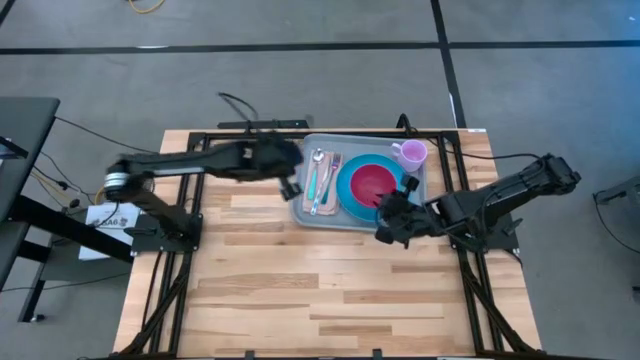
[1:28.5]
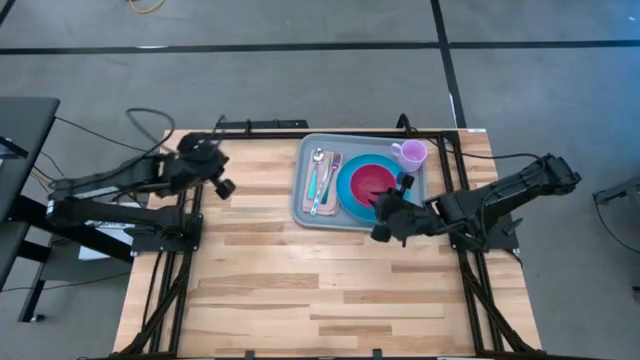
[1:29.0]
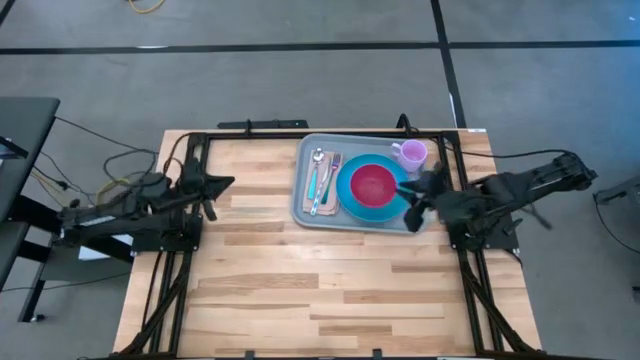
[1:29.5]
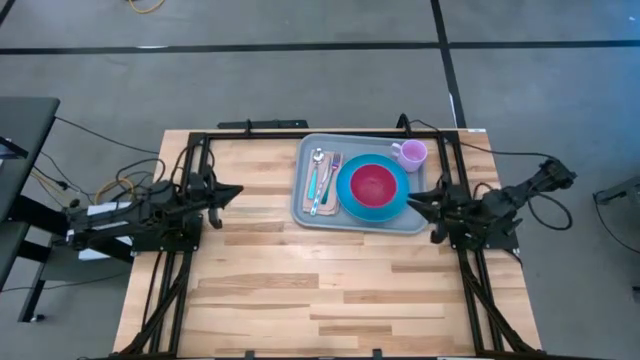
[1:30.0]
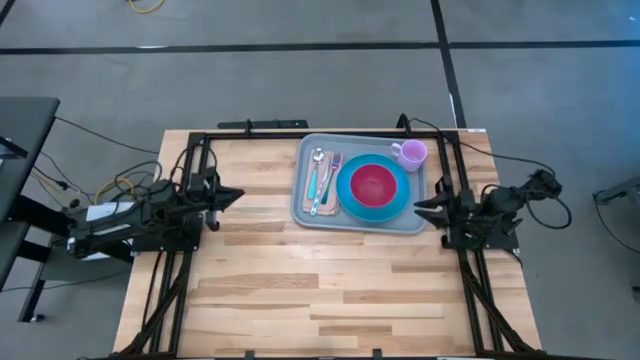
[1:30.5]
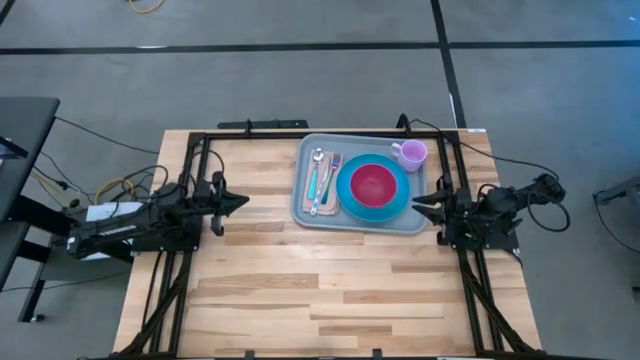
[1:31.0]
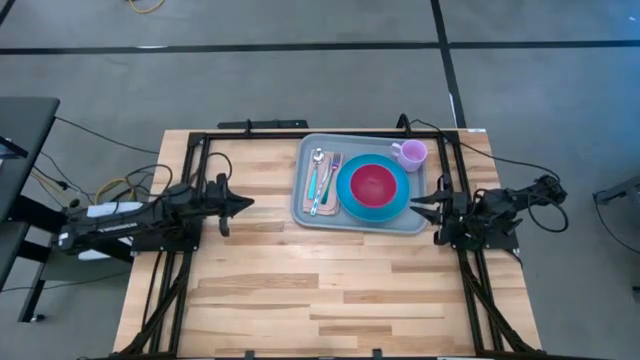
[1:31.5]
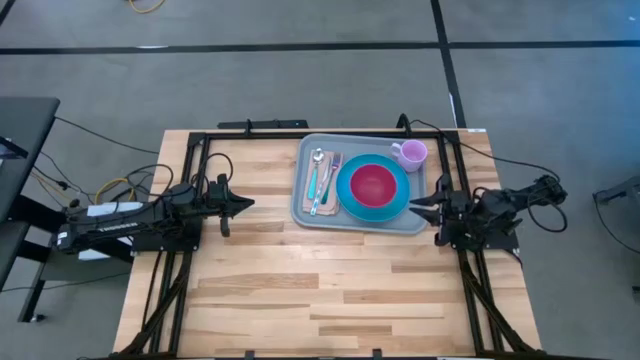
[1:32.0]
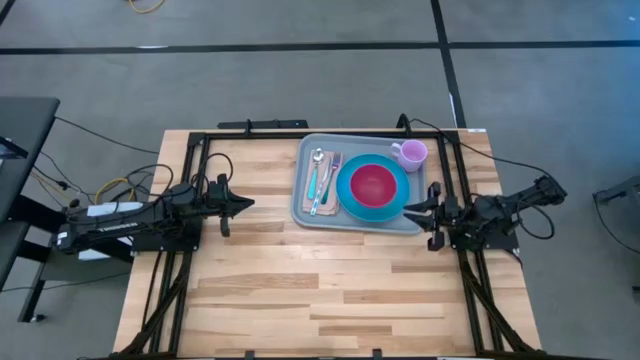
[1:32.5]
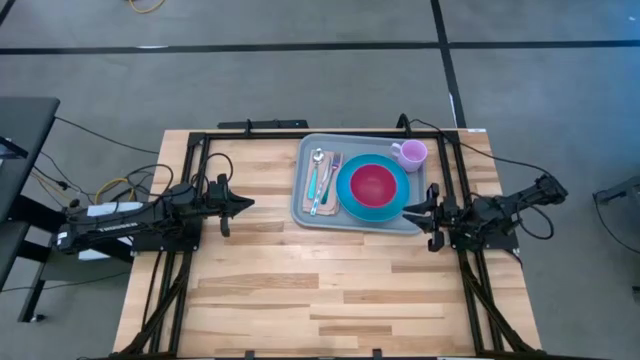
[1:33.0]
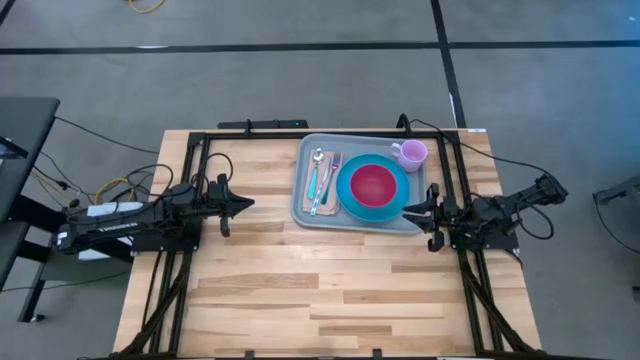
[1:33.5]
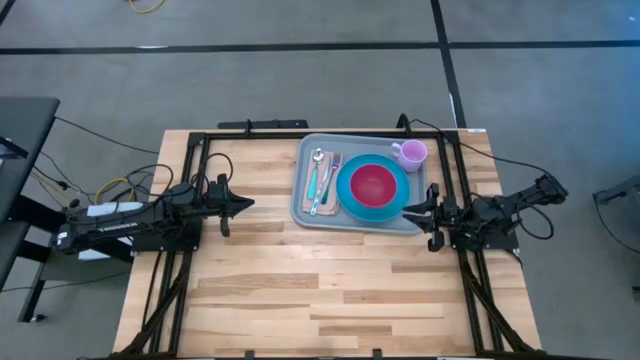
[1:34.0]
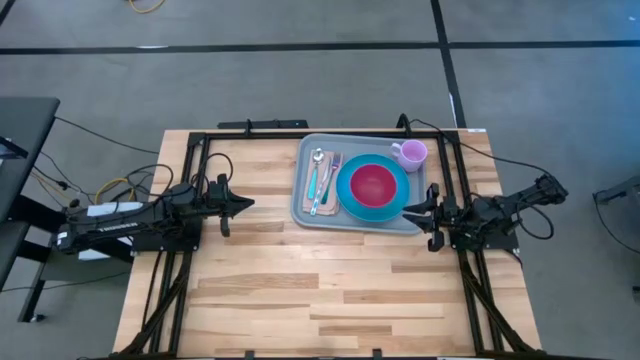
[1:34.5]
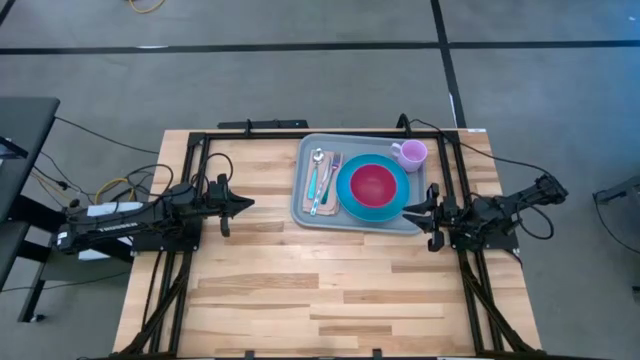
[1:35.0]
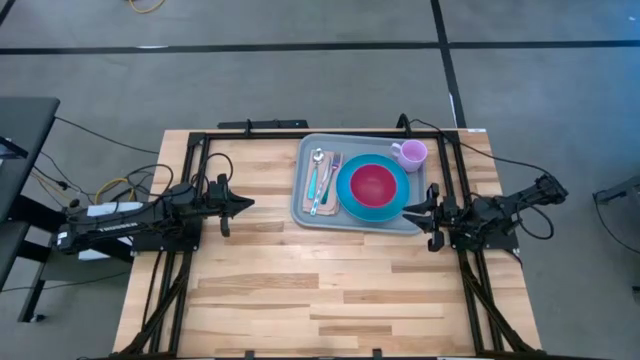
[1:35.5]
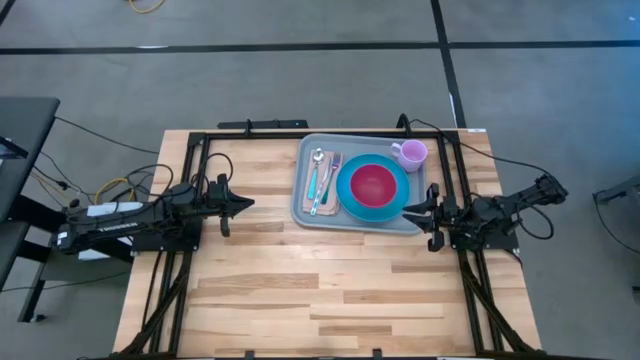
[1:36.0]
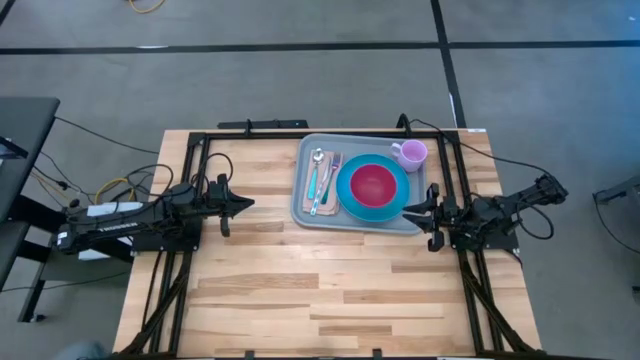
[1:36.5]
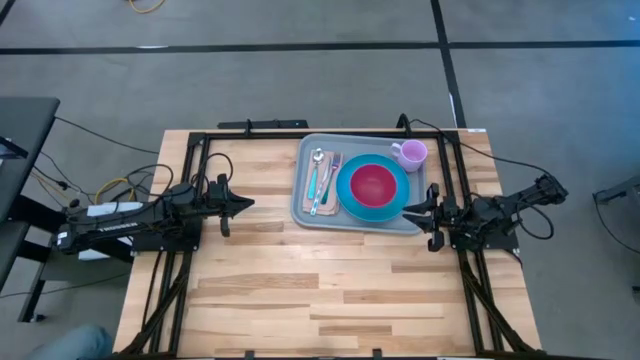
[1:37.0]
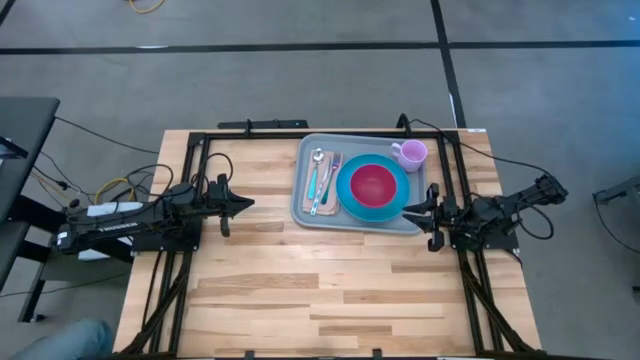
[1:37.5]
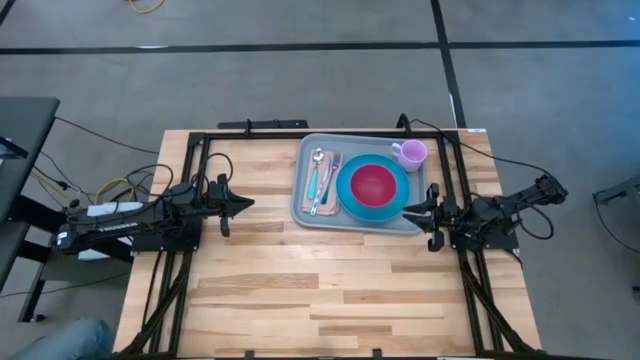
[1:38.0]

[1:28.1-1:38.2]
Task: Set up tray
Return to Home Position

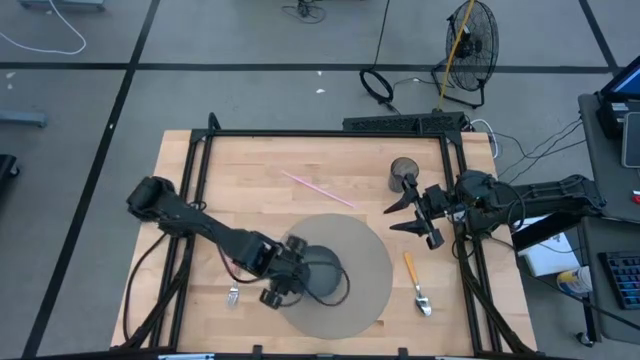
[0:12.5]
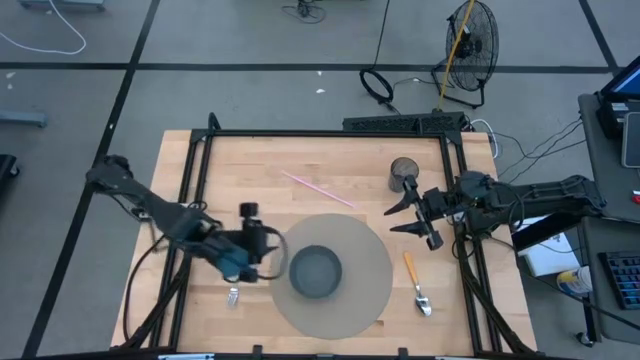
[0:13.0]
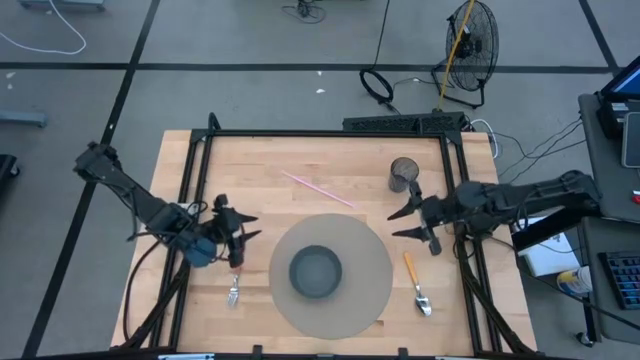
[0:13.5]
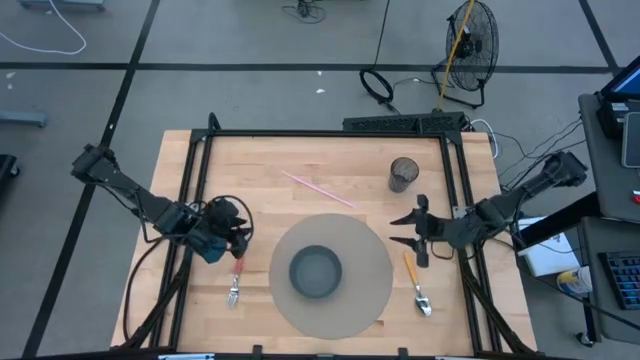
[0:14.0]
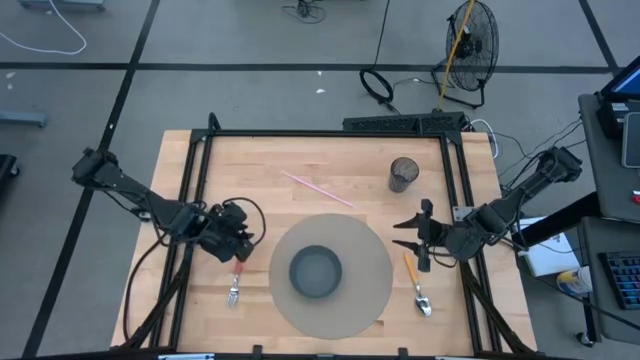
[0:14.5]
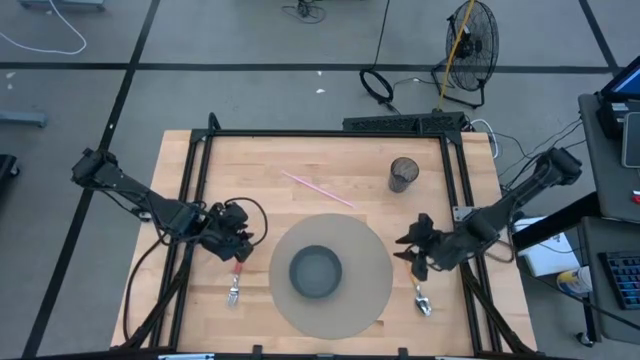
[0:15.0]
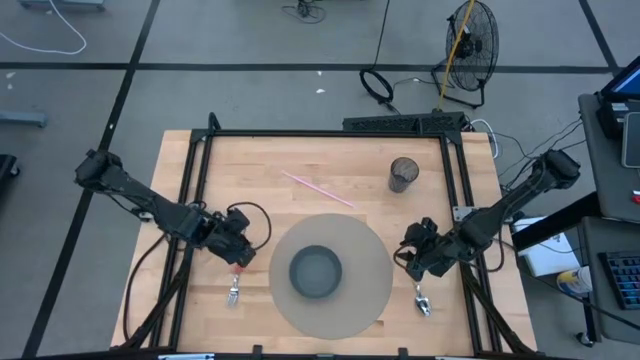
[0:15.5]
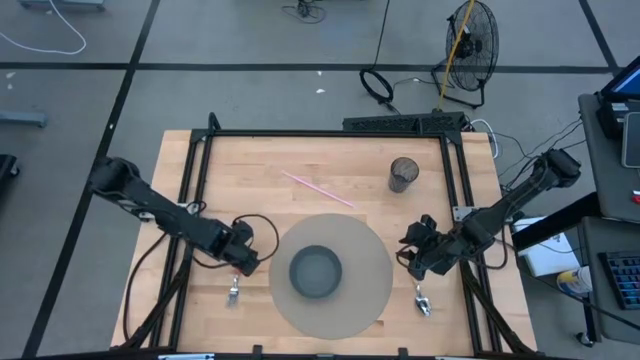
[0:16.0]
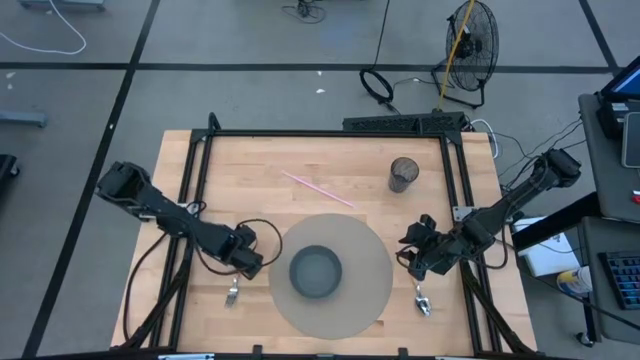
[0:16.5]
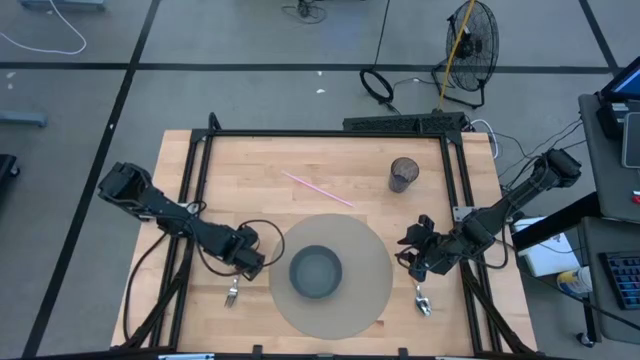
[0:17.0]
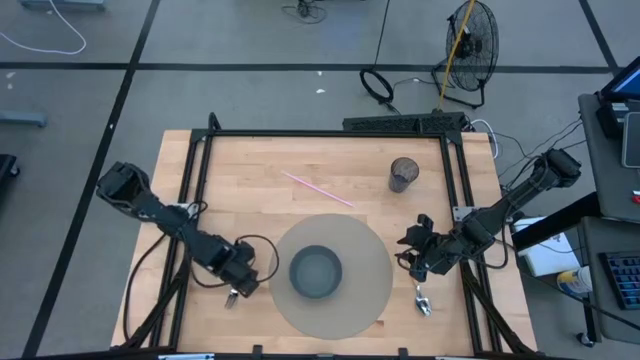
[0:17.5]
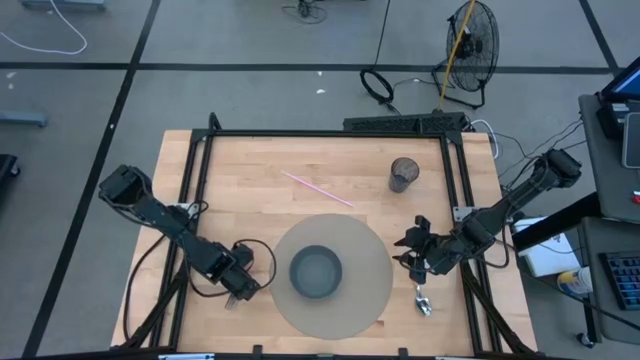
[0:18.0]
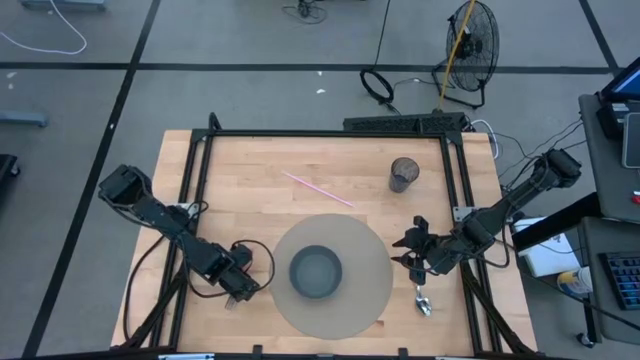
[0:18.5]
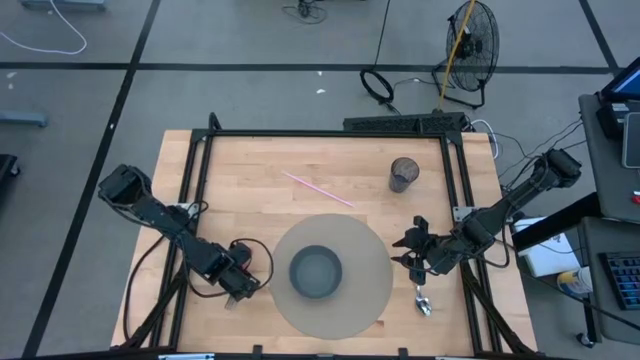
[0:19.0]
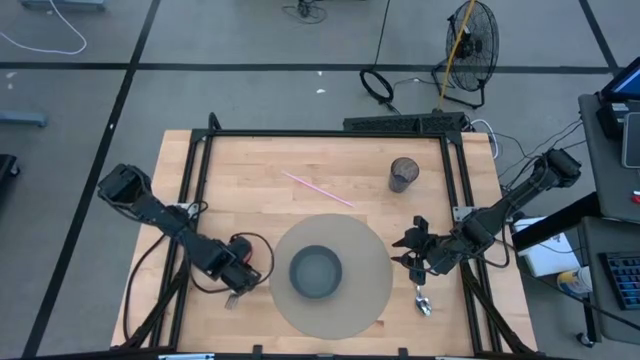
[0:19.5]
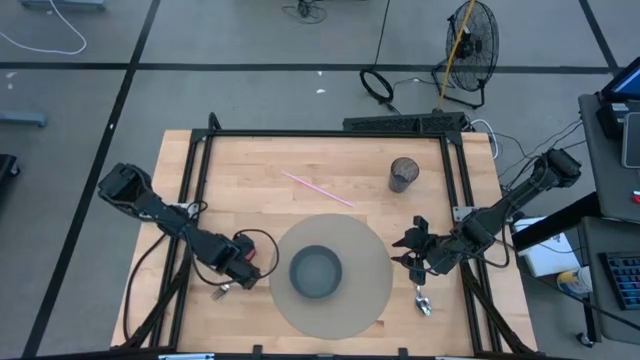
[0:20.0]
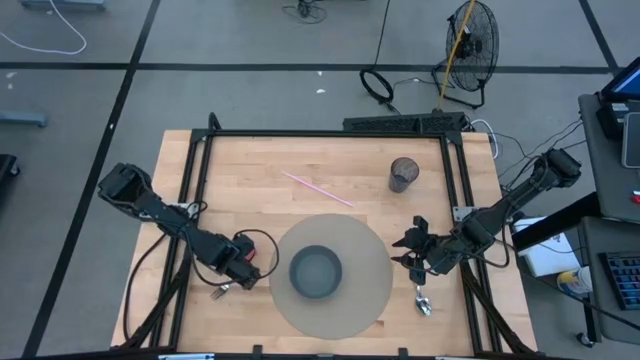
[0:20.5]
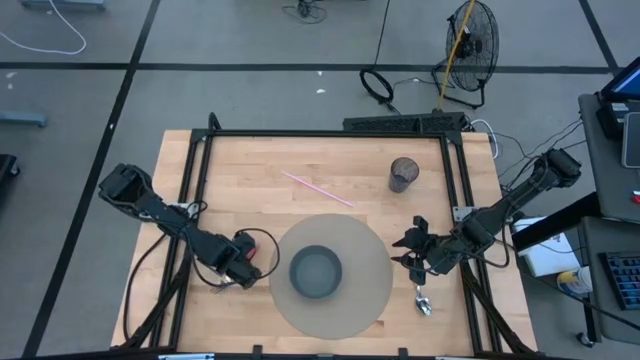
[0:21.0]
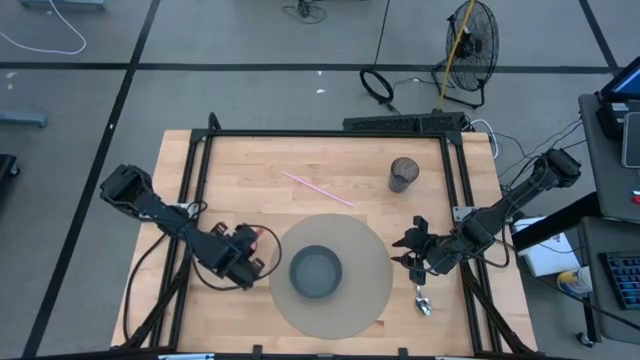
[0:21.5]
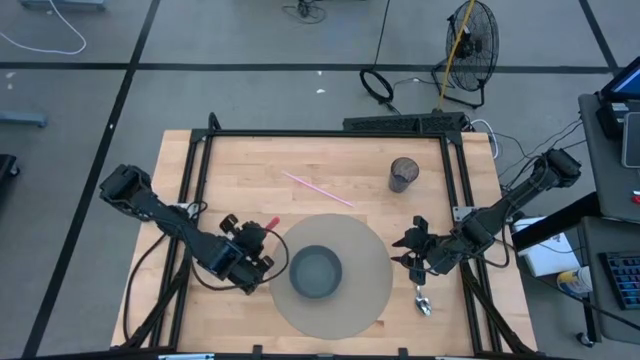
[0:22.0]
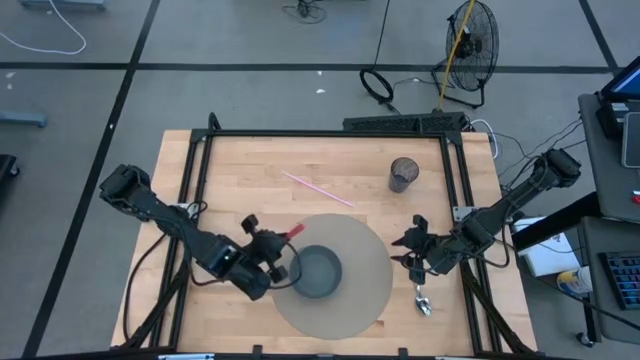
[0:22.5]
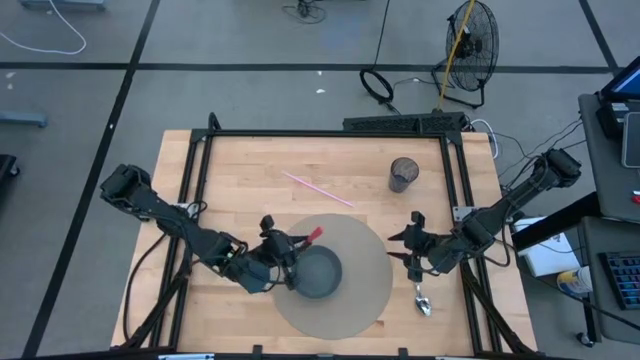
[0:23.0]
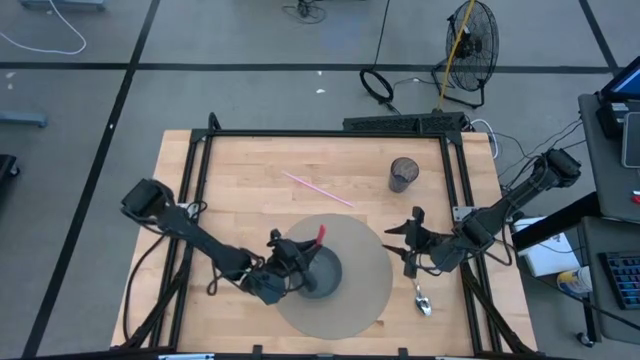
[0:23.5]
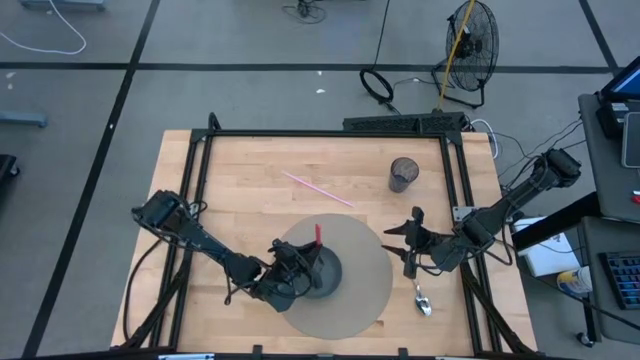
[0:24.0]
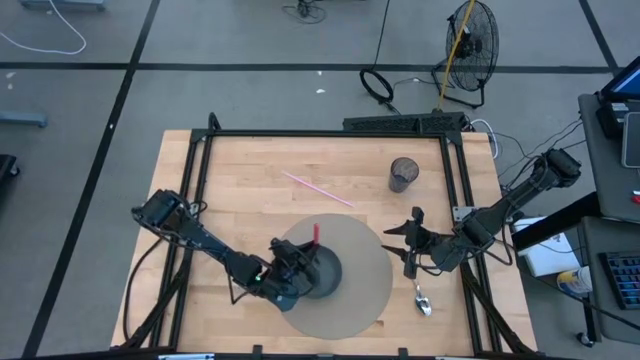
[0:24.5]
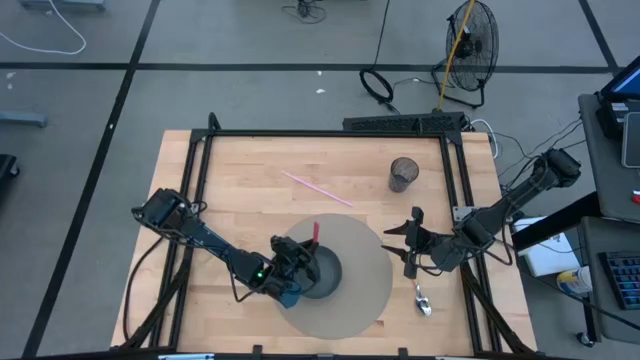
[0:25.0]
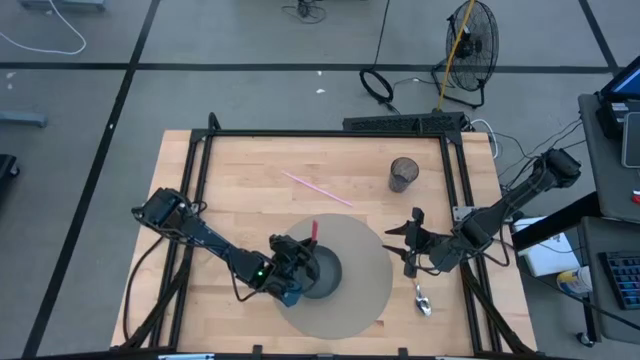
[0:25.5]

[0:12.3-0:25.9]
Task: Pick & Place Utensil
Put the red fork into the blue bowl on the brown placemat
